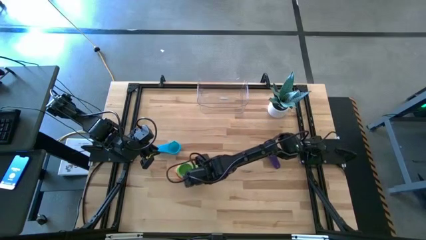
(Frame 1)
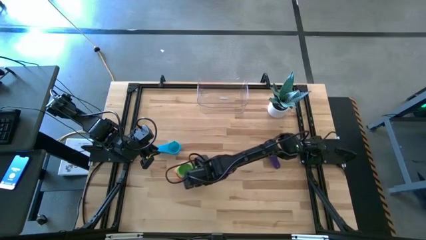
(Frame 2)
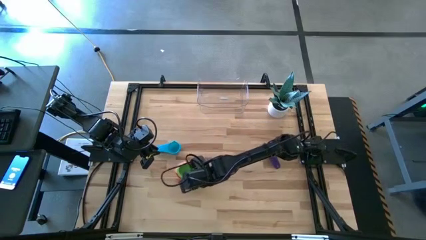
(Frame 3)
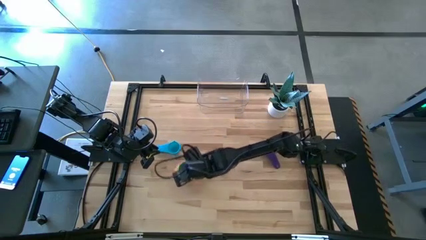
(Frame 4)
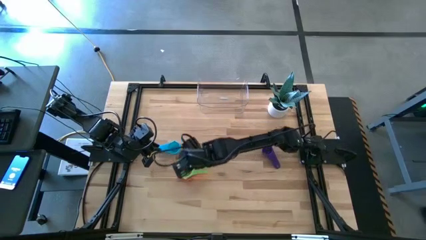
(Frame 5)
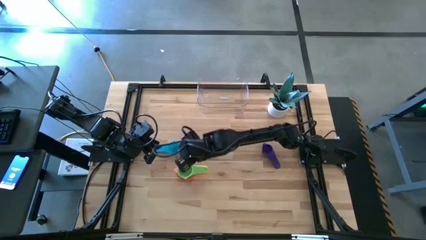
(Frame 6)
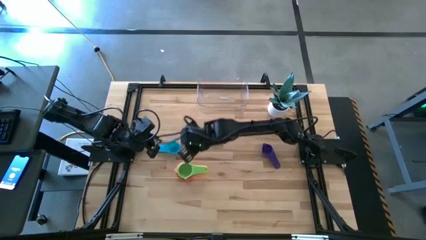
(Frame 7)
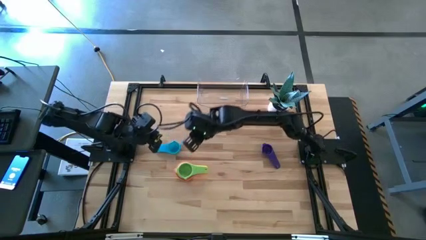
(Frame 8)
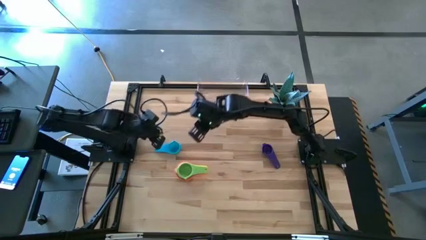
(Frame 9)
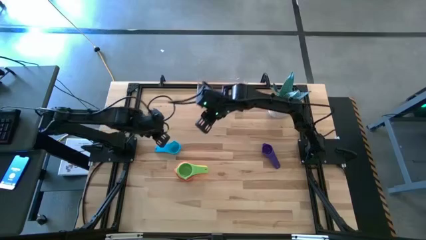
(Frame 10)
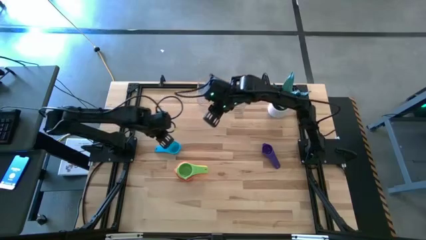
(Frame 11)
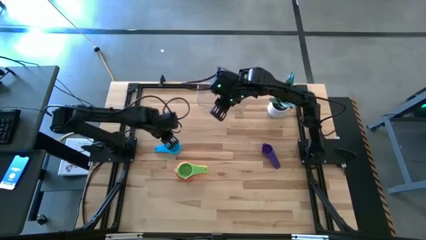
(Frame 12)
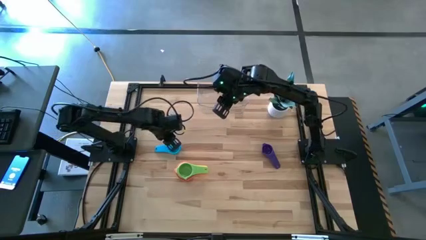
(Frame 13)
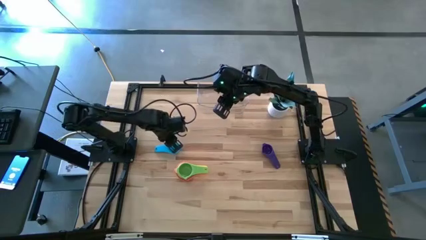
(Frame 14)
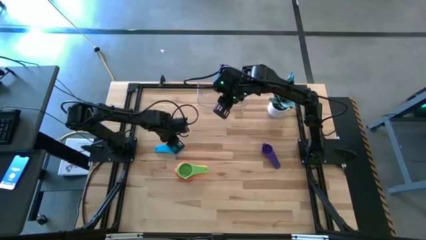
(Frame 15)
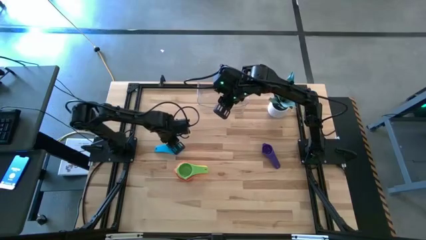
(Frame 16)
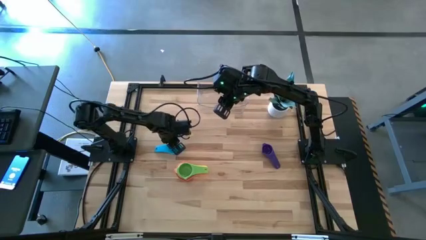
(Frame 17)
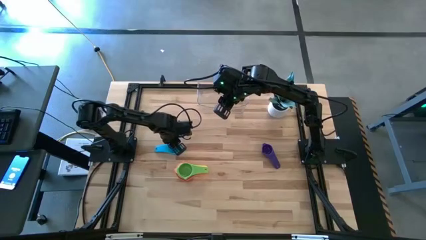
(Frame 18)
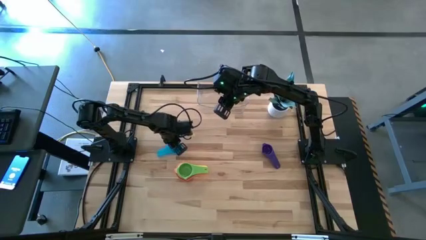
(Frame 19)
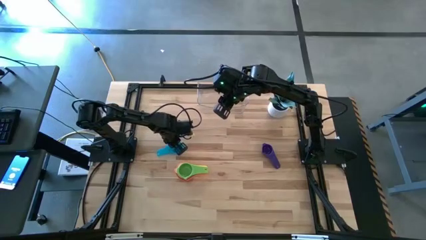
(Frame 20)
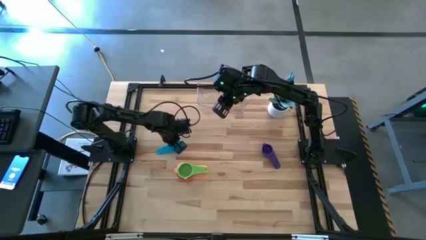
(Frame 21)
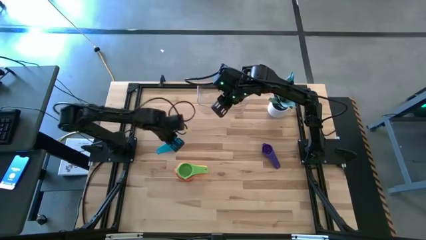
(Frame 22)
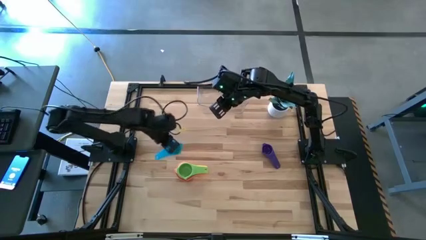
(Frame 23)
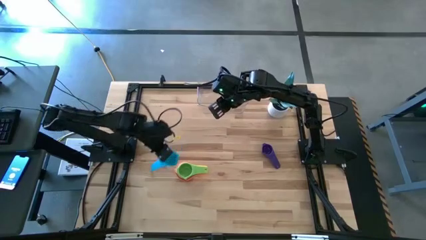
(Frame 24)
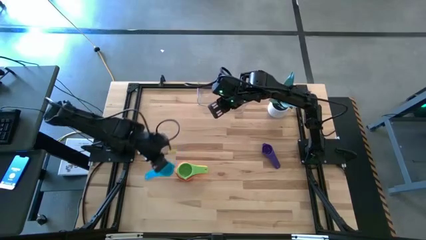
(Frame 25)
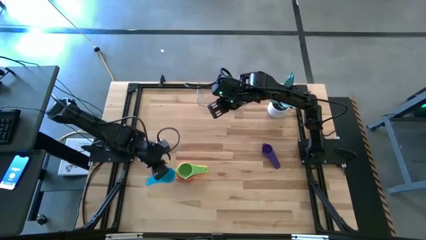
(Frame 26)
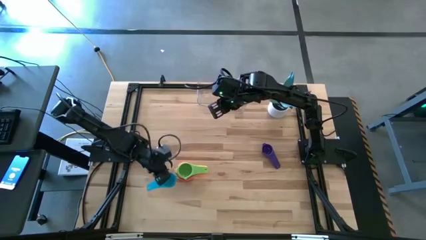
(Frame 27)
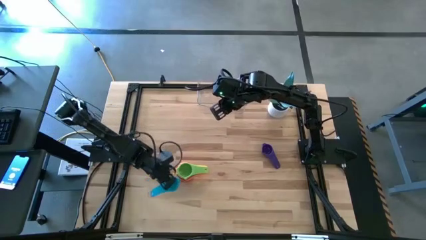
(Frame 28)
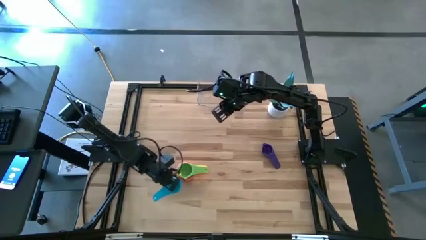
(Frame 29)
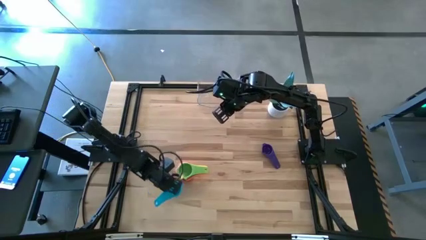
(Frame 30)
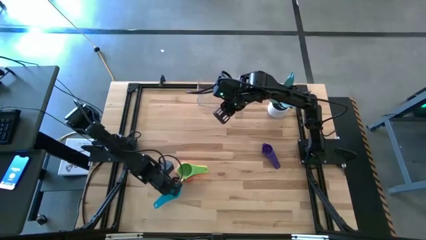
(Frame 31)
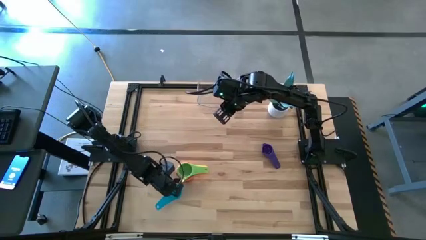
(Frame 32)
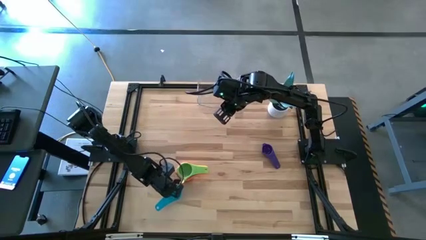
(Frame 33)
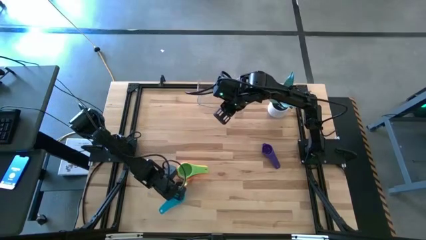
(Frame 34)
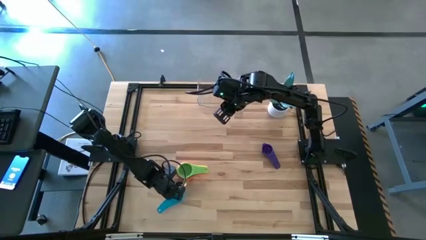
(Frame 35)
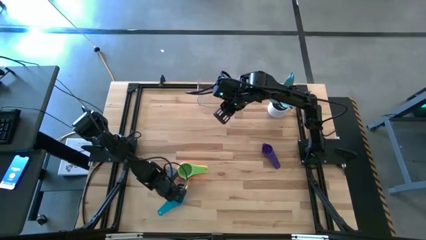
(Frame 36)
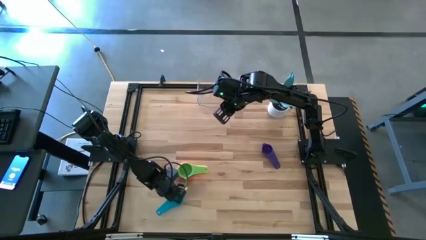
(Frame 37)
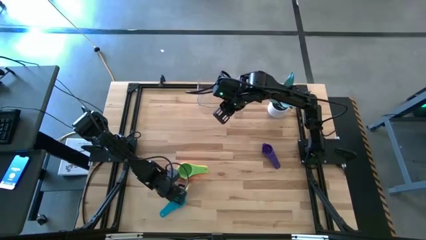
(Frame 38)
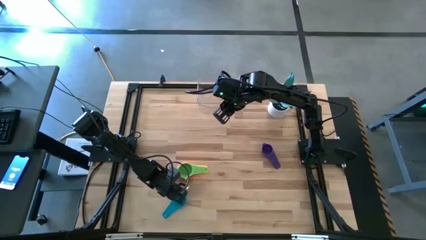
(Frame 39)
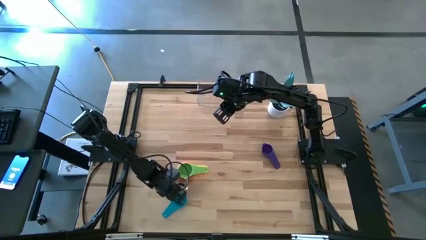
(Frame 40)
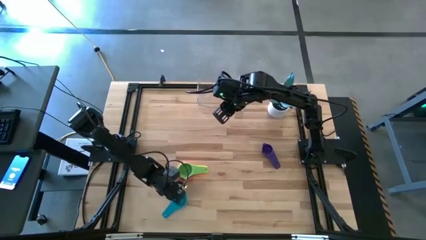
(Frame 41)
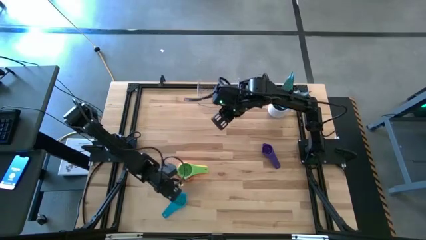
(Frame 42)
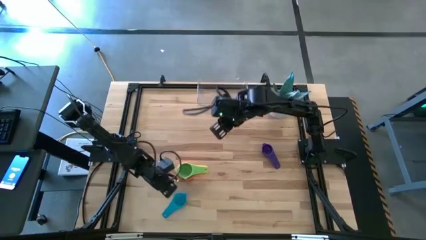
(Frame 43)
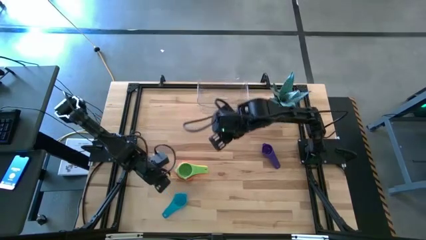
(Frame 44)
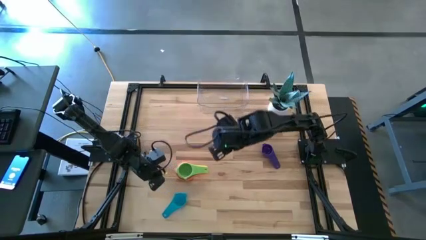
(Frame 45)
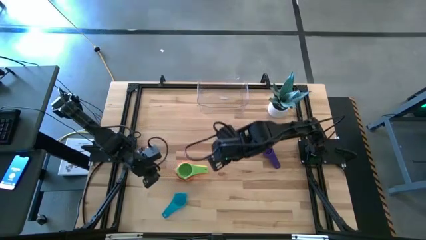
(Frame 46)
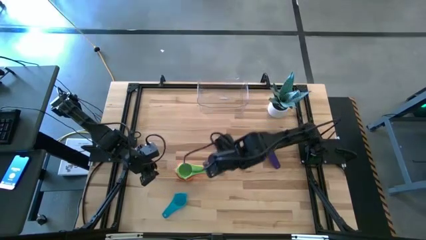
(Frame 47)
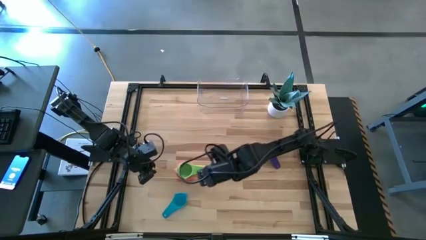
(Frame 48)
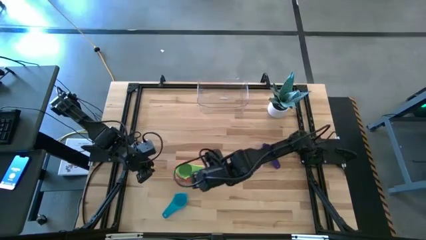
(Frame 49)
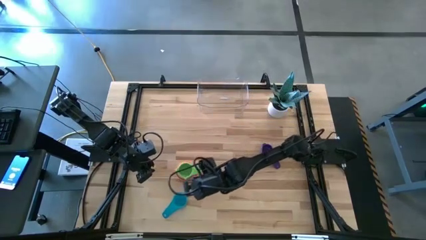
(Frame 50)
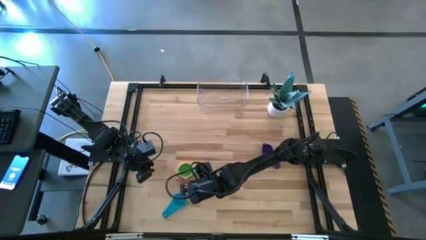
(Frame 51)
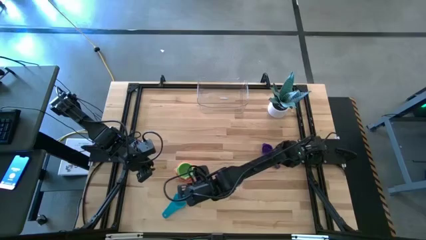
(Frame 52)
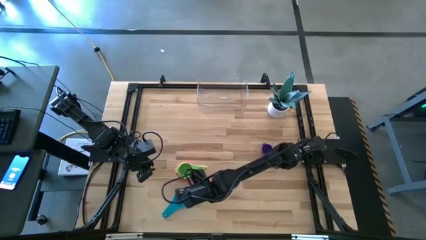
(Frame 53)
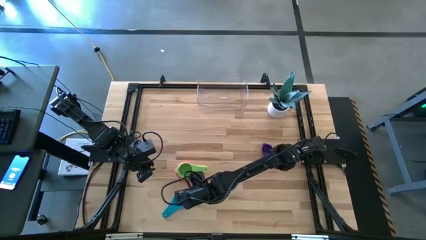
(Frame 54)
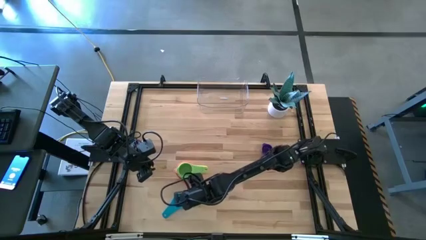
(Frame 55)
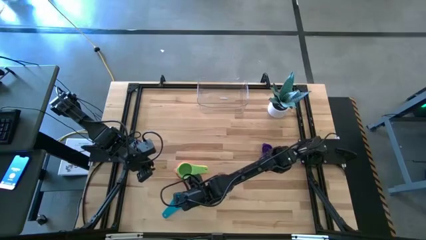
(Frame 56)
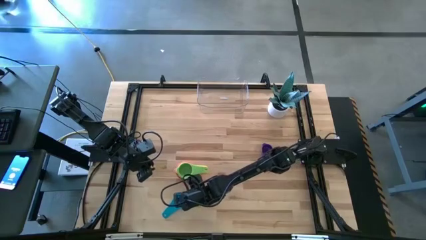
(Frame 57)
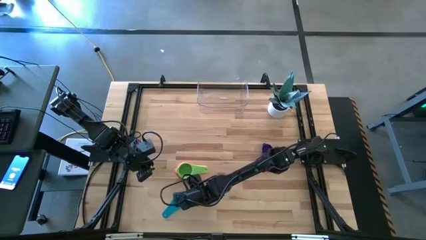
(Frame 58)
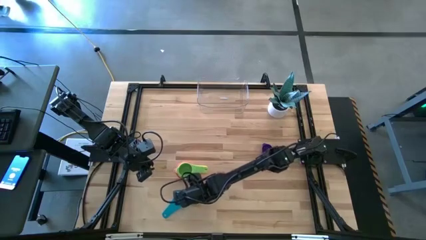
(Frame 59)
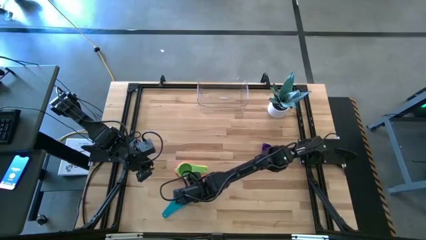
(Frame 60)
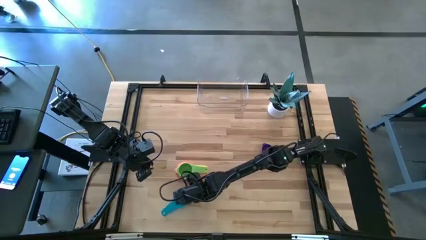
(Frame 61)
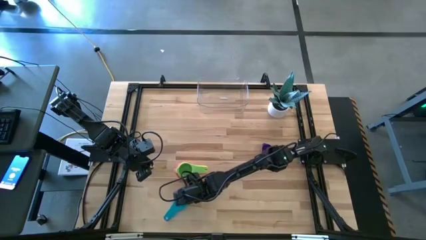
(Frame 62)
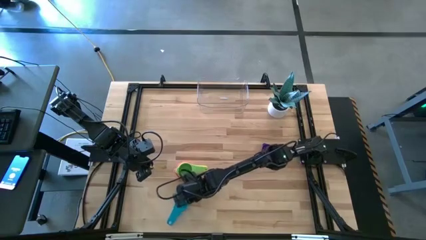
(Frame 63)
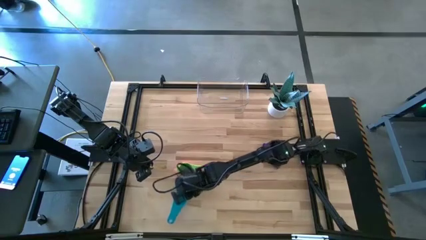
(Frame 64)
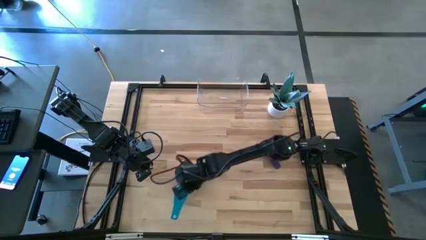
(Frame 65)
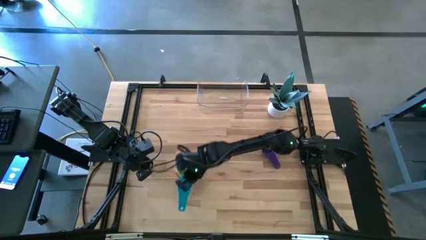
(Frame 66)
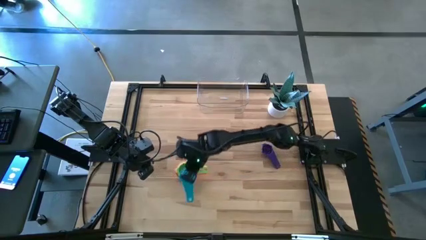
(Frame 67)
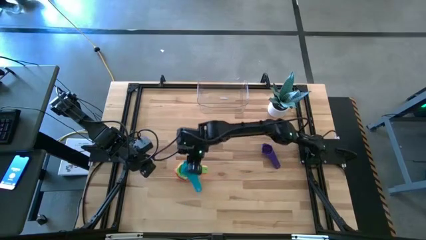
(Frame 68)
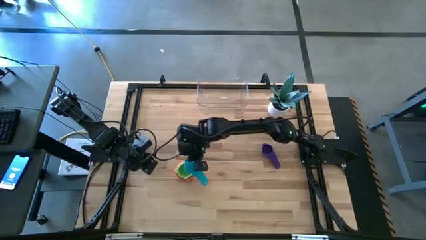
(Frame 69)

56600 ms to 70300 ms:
Task: Nest measuring cups in basket
Stack the light blue measuring cup on top of the light green measuring cup

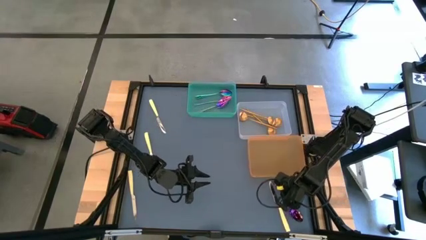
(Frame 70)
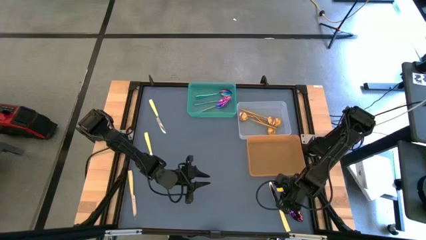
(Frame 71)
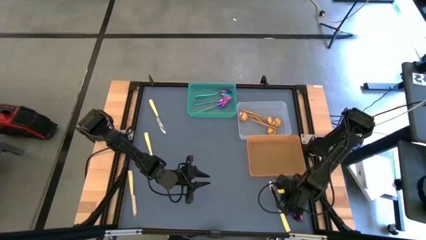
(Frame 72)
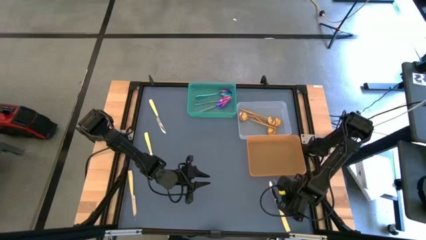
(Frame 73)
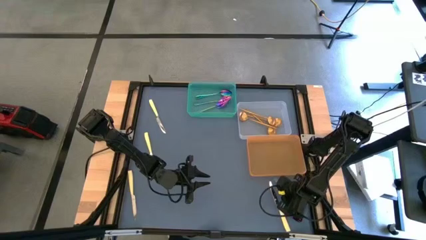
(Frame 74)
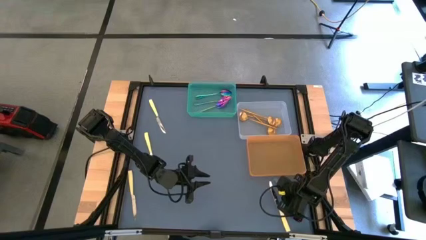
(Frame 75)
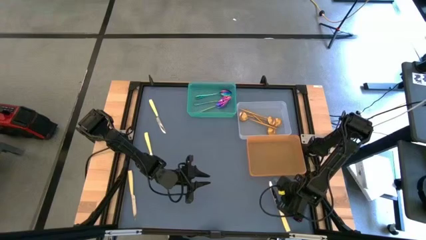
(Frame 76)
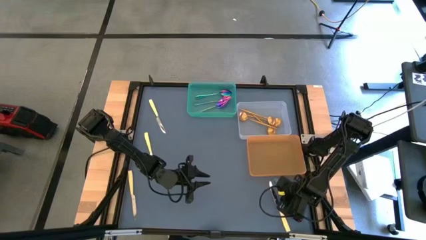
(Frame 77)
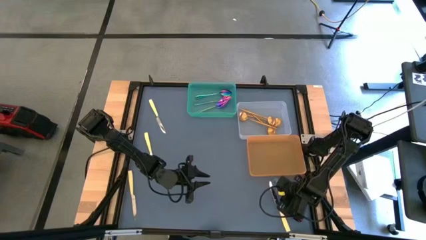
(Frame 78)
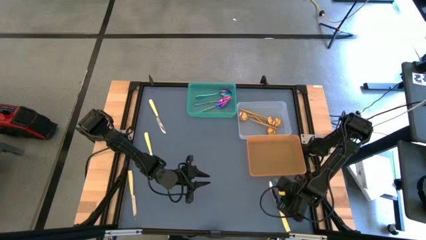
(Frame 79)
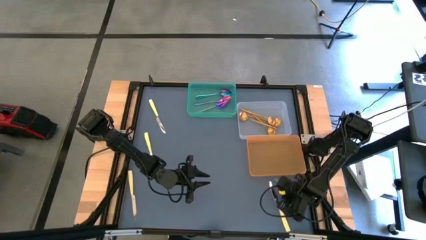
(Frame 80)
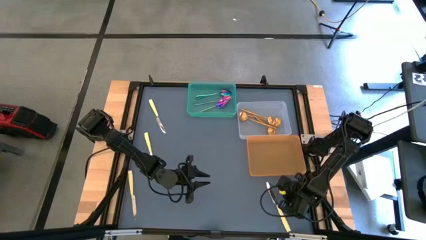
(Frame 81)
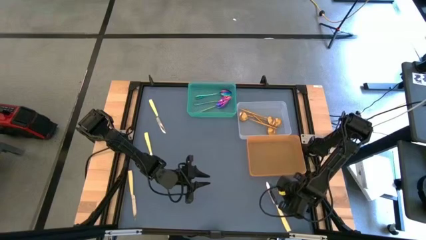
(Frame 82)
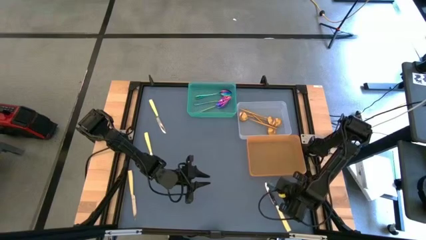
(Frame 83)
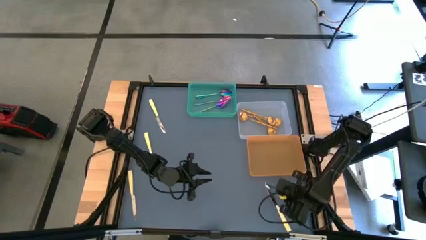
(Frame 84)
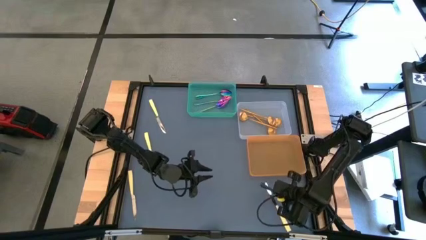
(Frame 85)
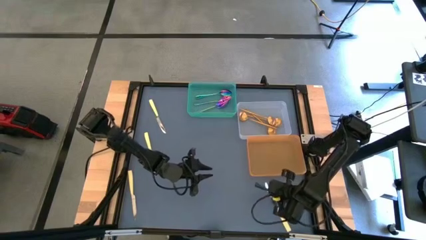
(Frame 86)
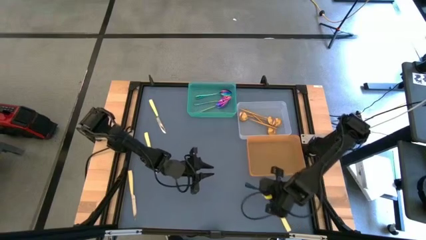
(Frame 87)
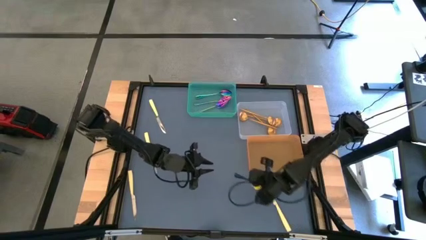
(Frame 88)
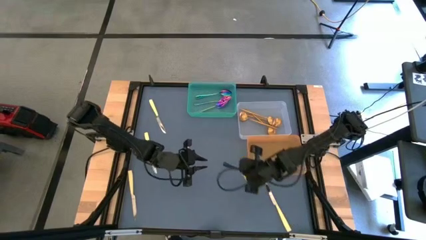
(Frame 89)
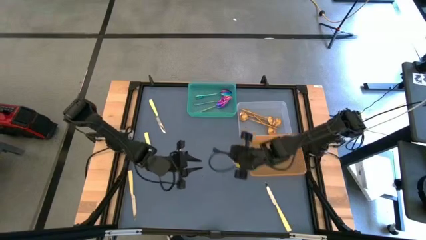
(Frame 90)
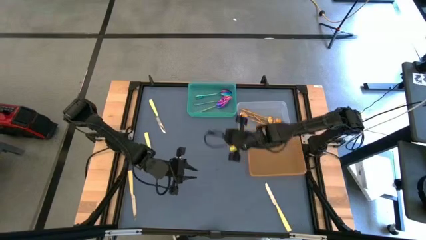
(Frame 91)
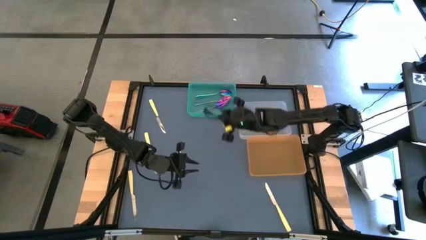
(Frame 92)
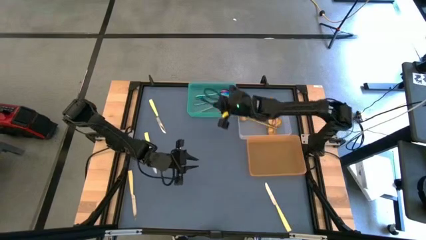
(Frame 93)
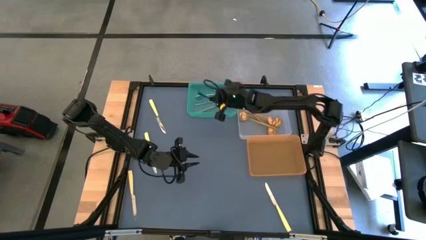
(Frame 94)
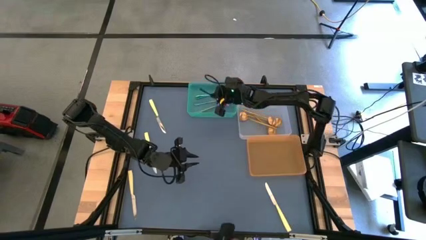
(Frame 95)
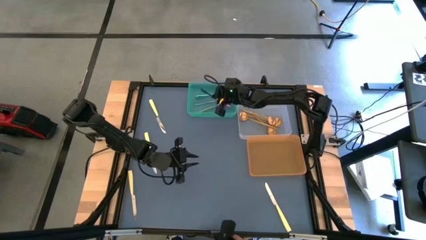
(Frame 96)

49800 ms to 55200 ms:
Task: Sort silverware by color (type)
Put the purple spoon into the green bin
